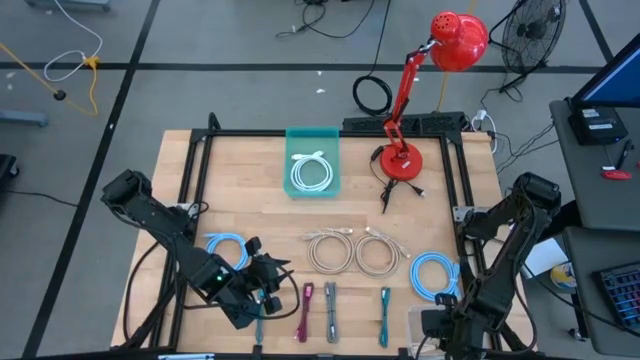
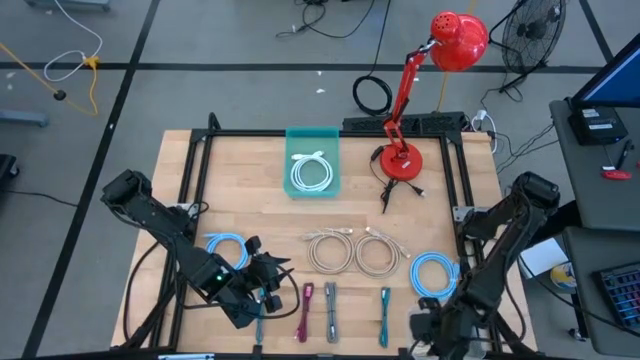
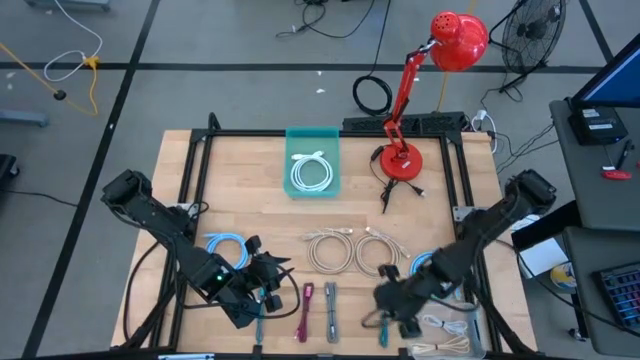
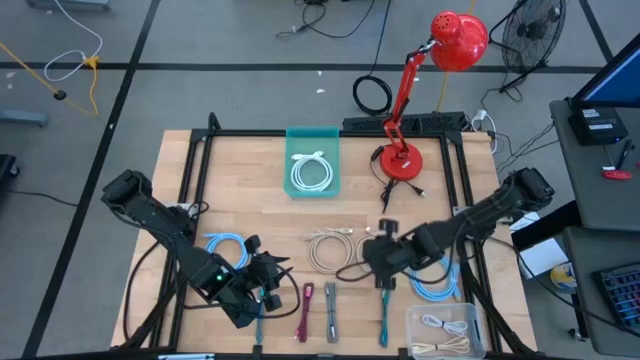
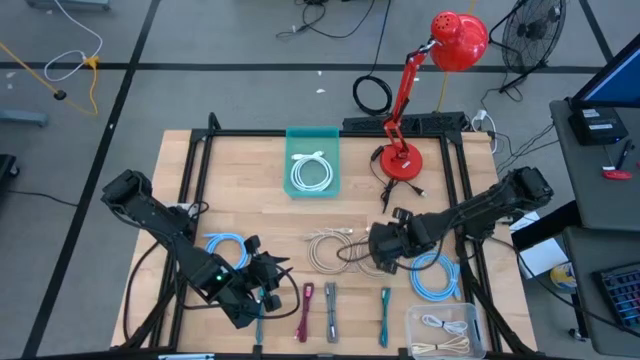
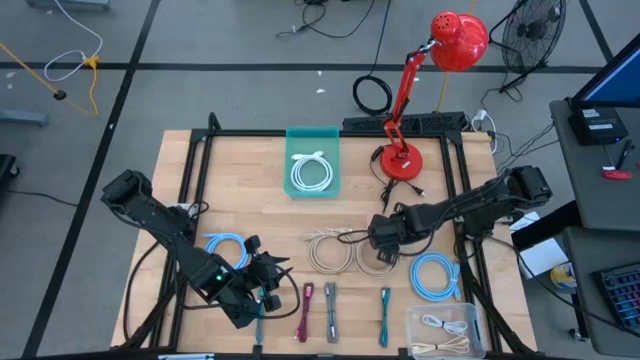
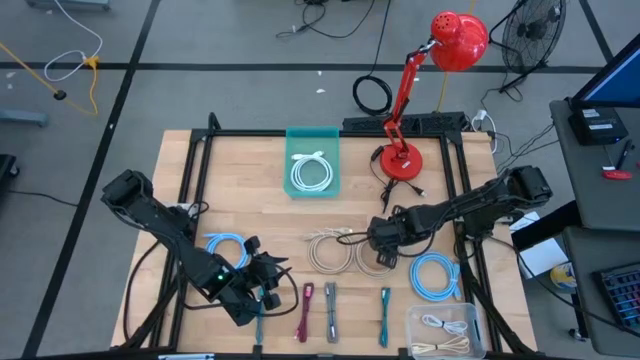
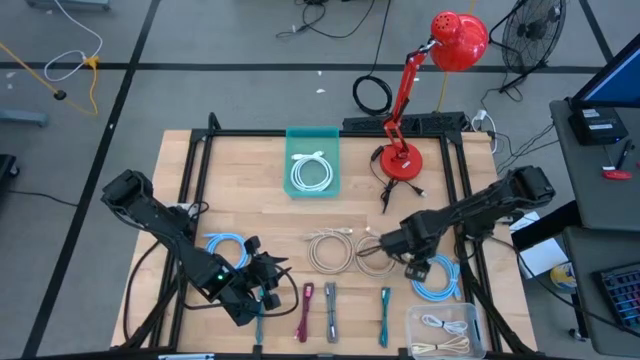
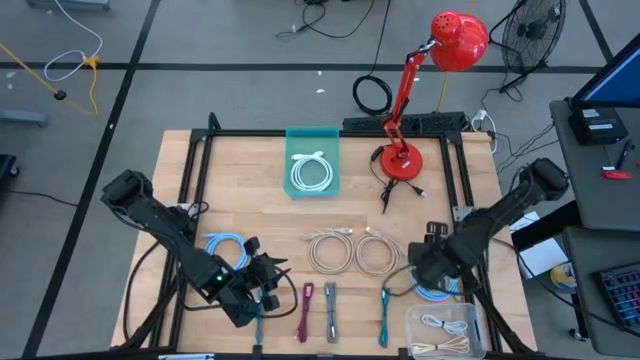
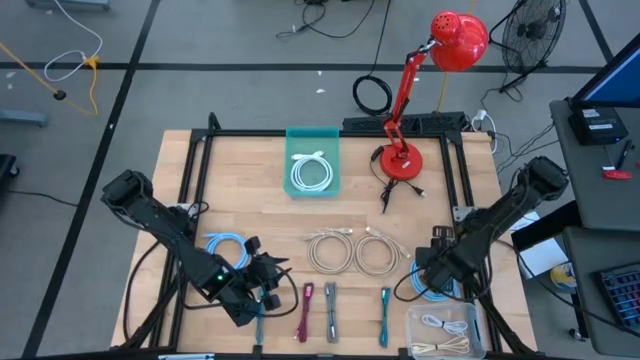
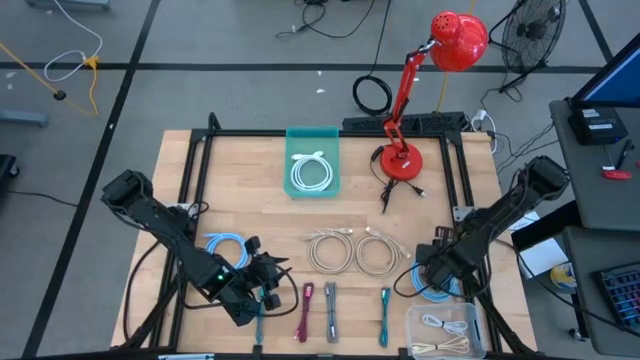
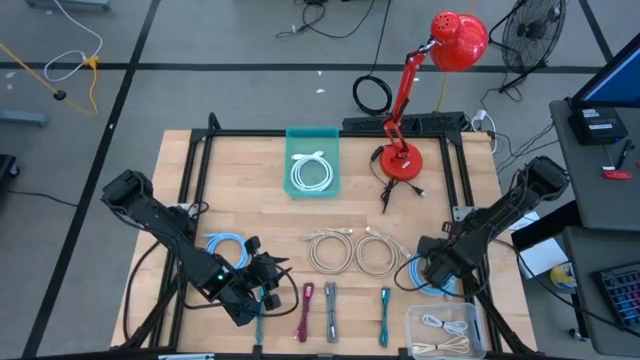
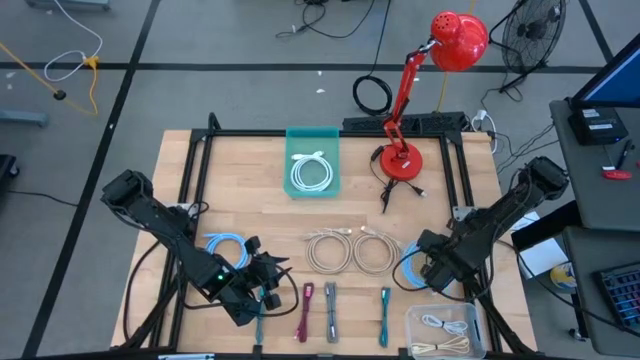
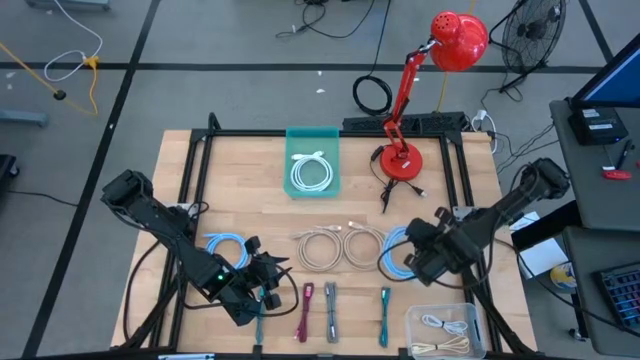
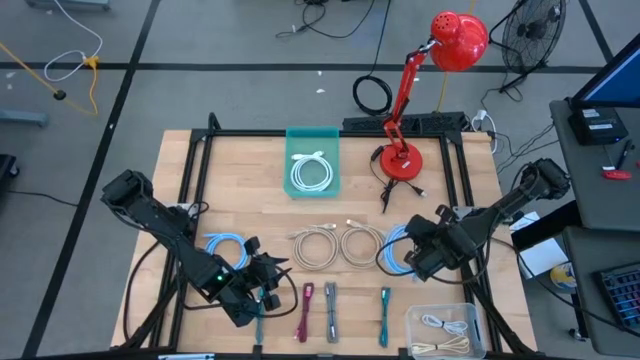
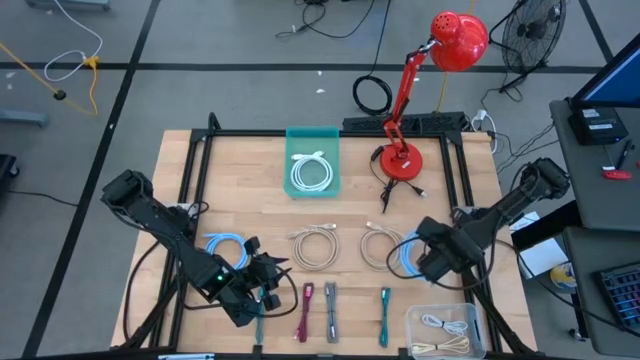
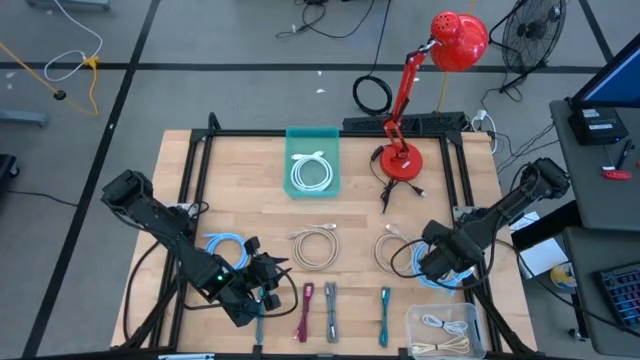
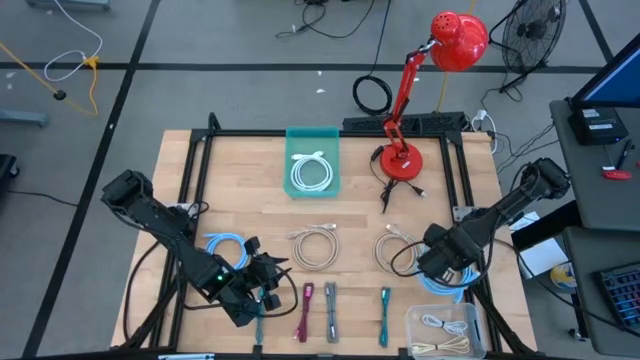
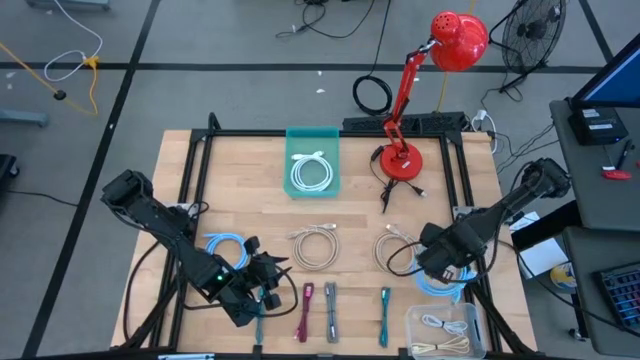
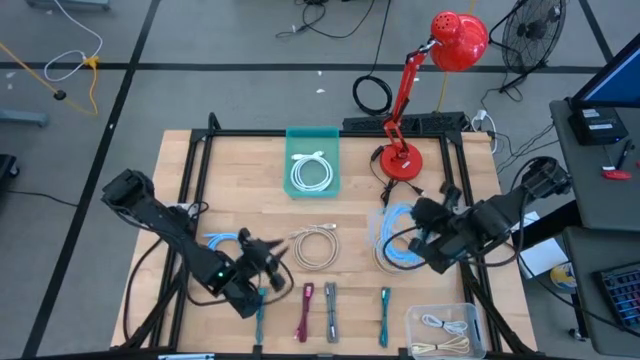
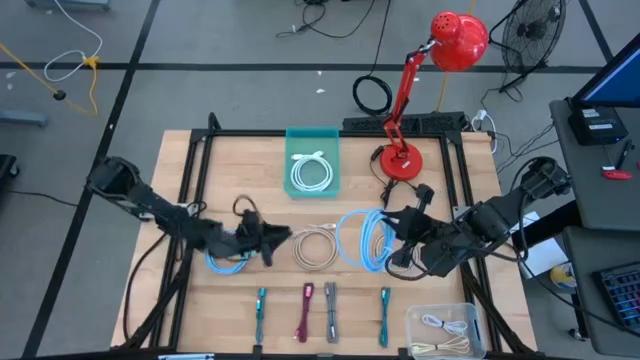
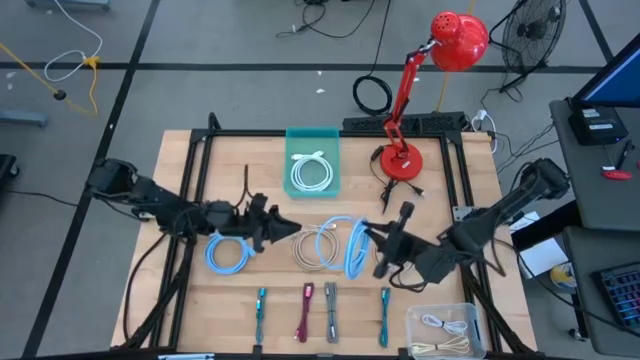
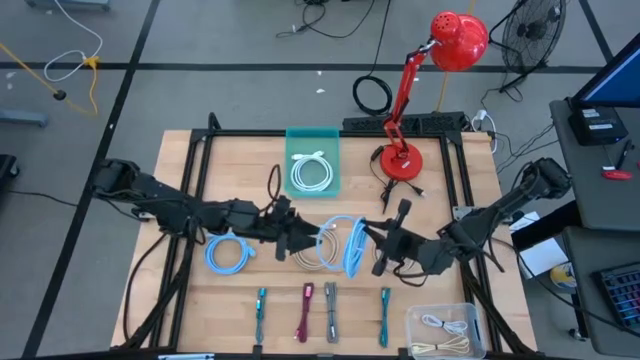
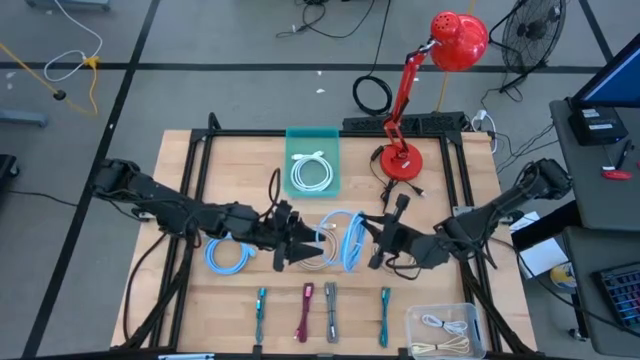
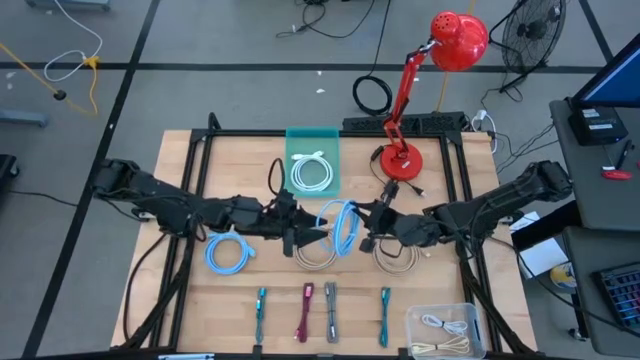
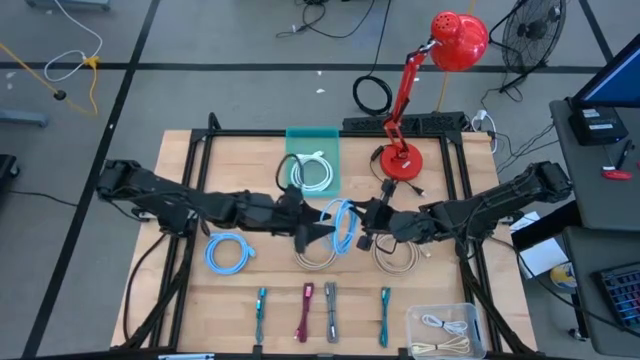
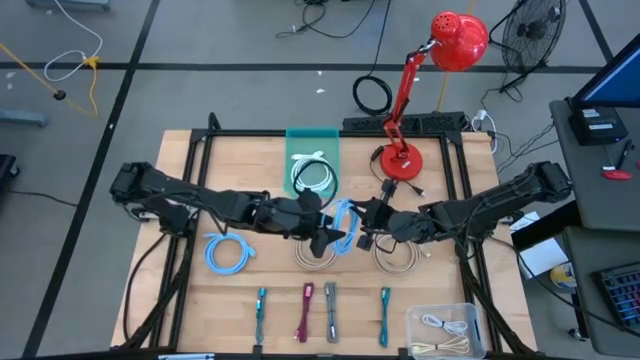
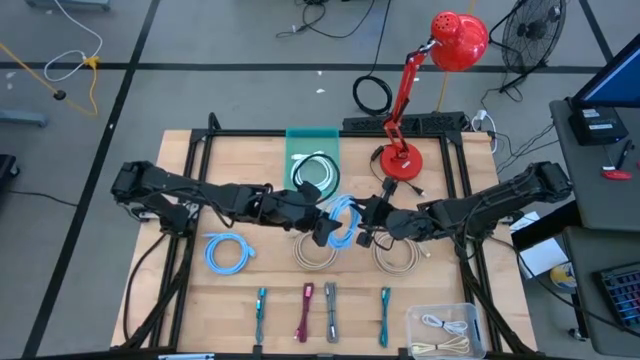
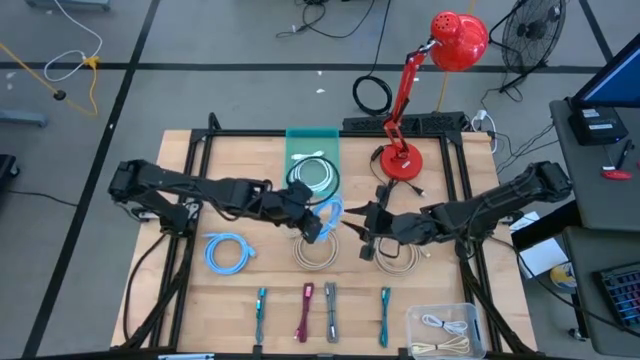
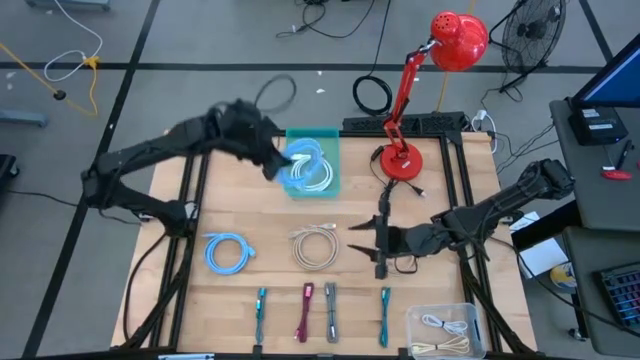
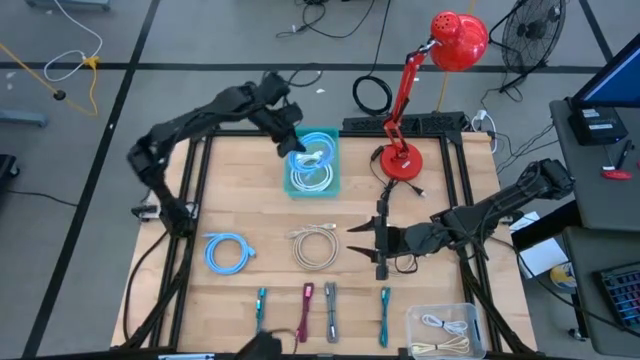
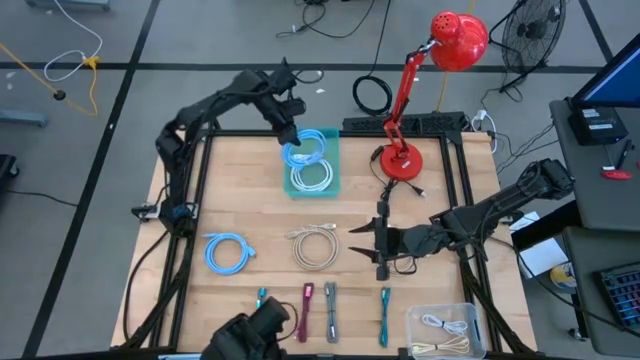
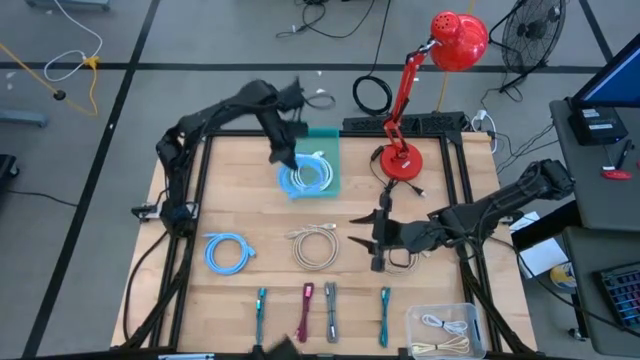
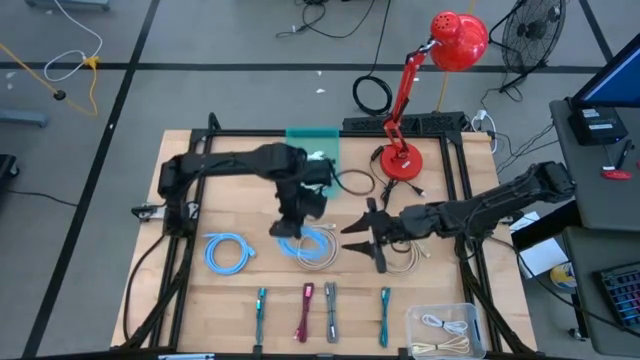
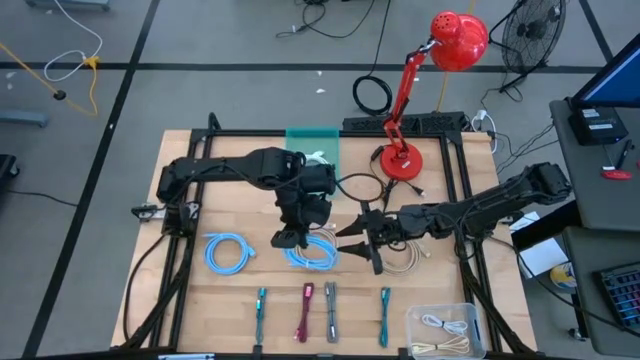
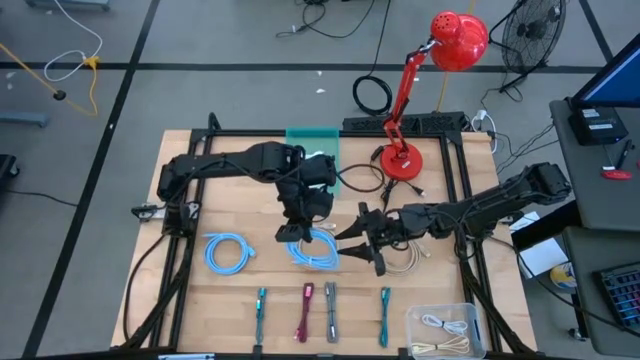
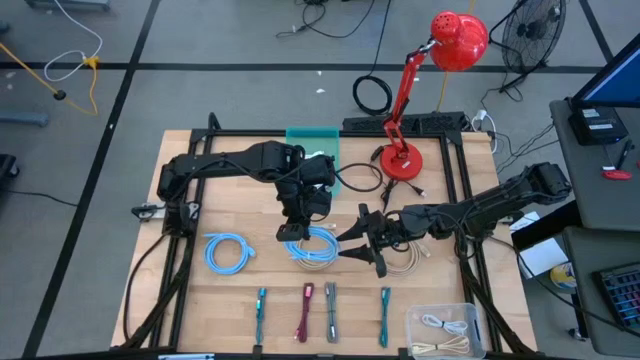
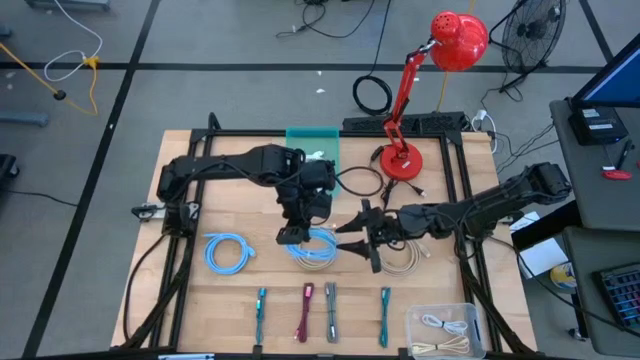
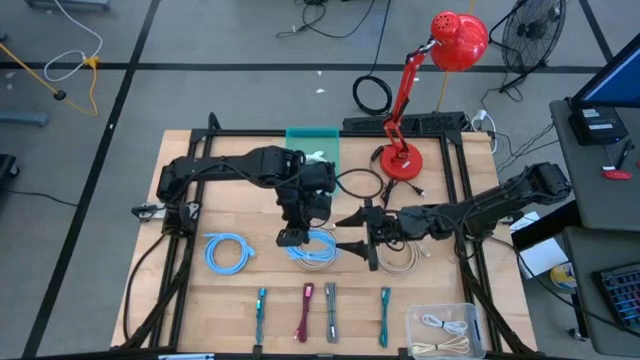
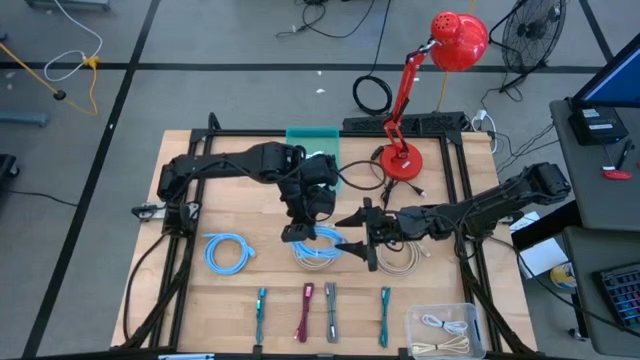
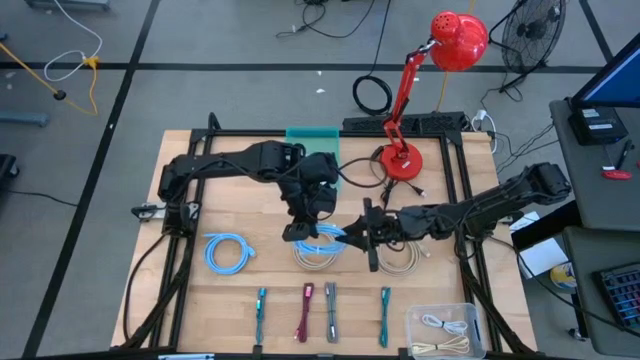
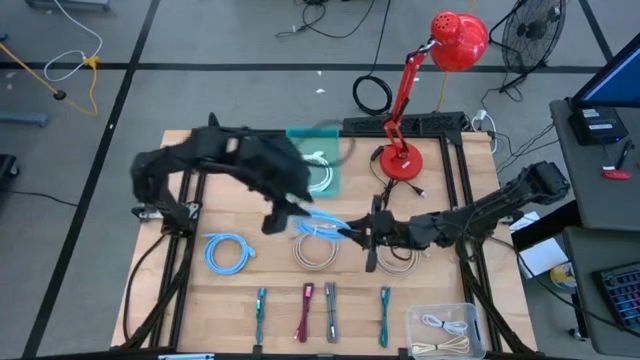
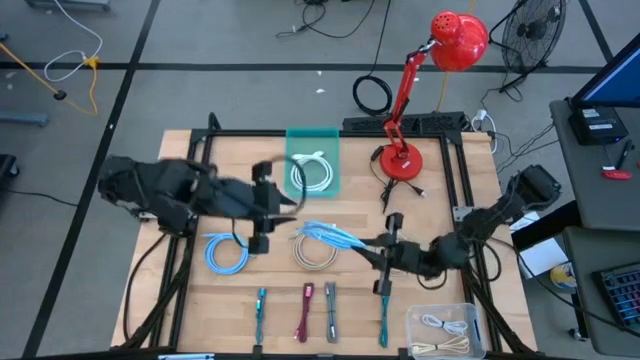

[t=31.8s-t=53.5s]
Task: Pick & Place USB Port
Put the right blue HDMI cable into the green bin
